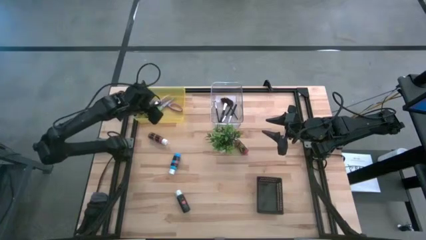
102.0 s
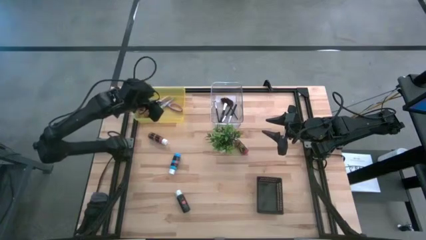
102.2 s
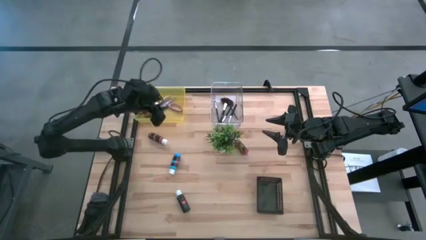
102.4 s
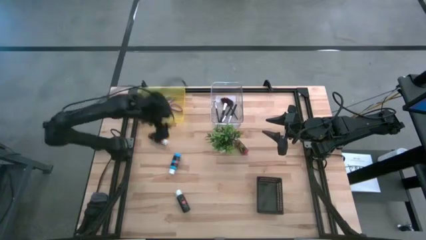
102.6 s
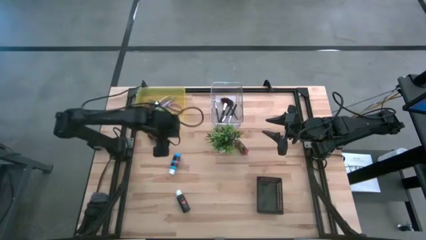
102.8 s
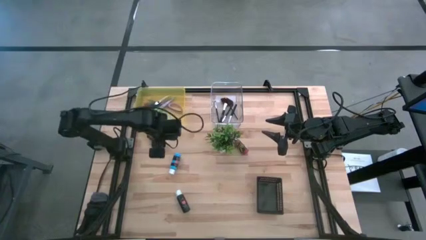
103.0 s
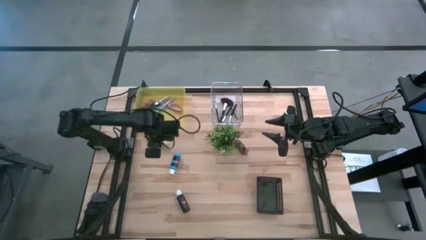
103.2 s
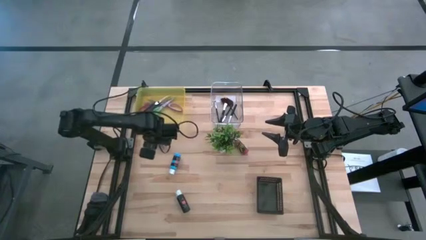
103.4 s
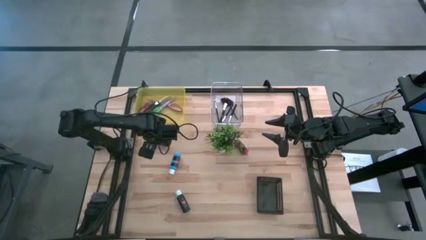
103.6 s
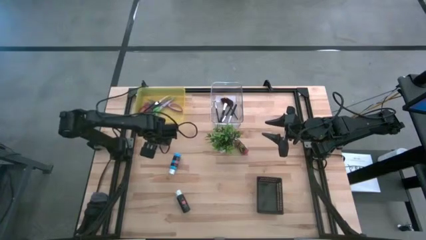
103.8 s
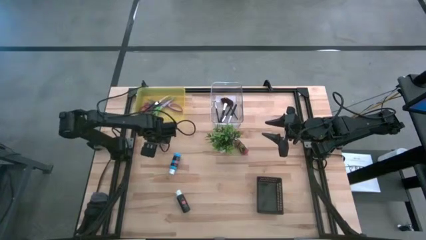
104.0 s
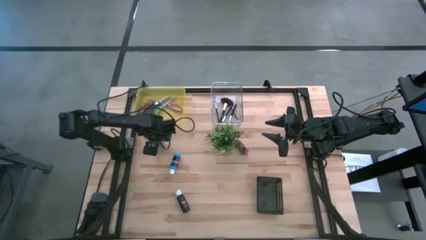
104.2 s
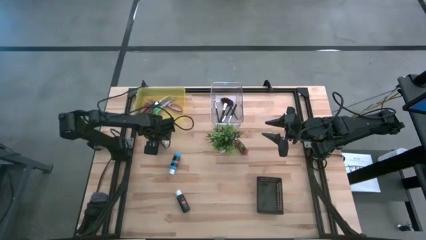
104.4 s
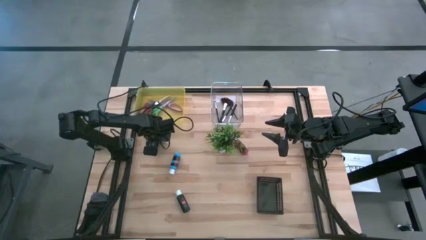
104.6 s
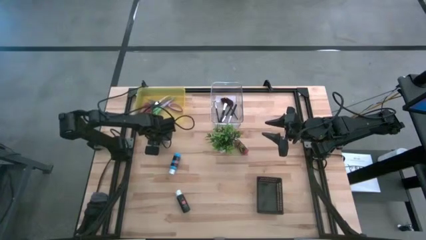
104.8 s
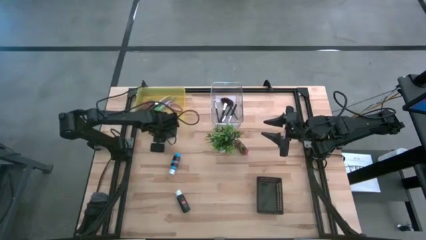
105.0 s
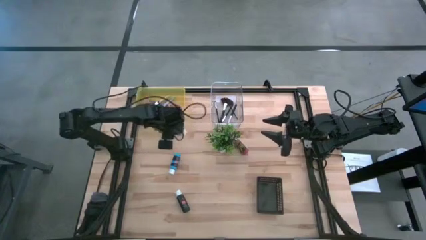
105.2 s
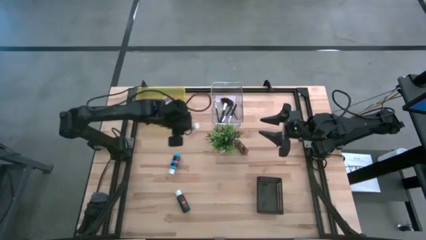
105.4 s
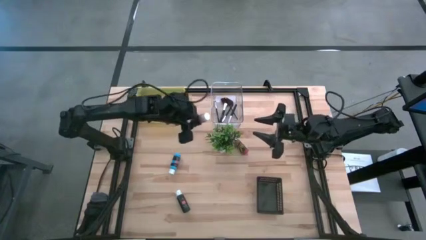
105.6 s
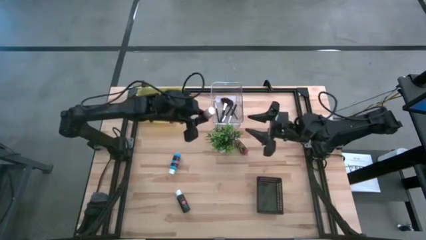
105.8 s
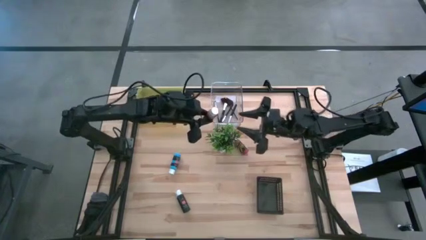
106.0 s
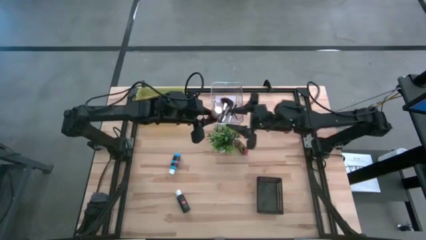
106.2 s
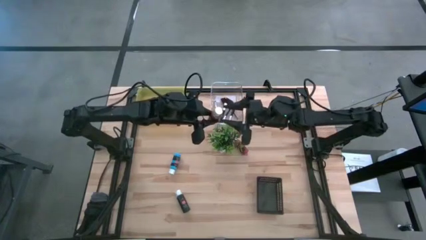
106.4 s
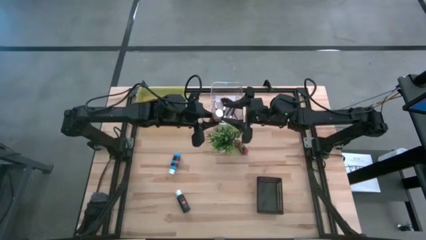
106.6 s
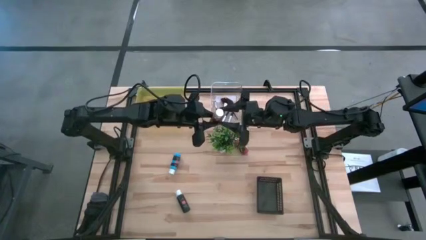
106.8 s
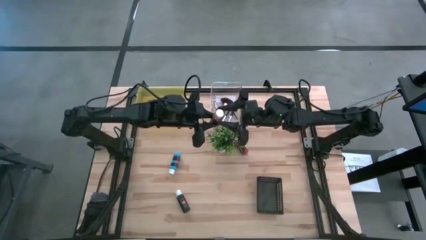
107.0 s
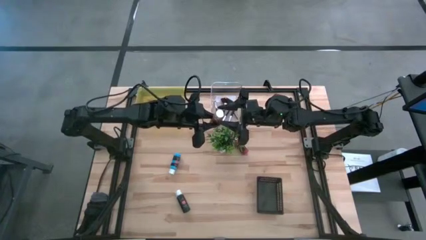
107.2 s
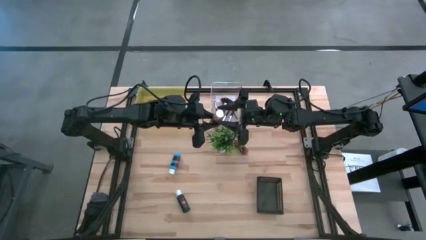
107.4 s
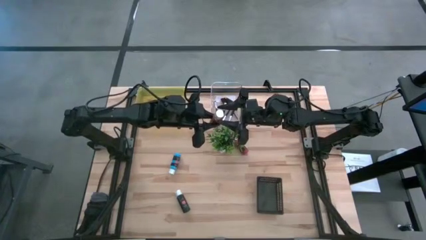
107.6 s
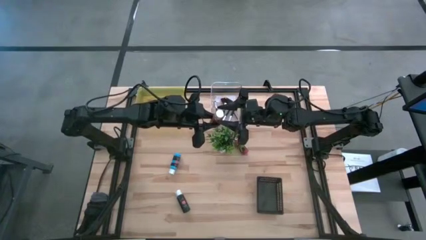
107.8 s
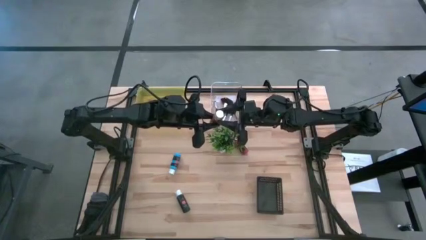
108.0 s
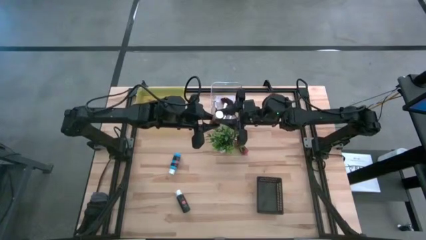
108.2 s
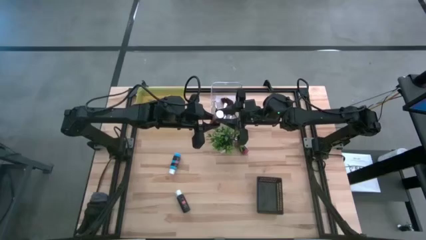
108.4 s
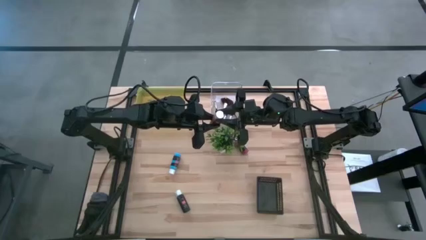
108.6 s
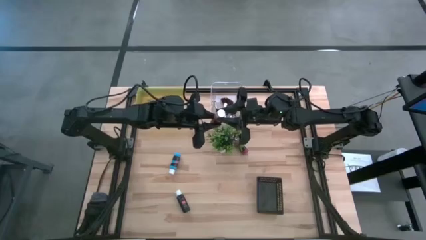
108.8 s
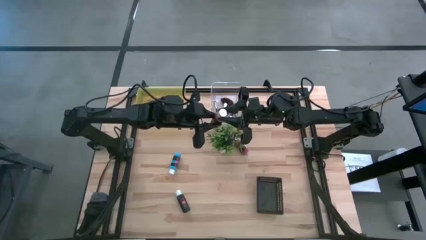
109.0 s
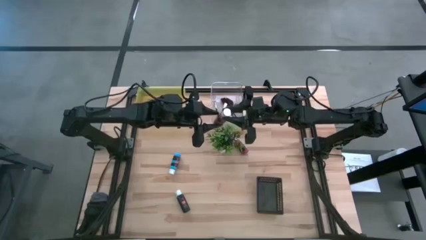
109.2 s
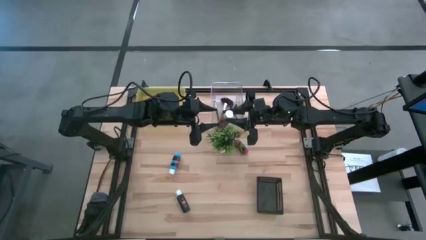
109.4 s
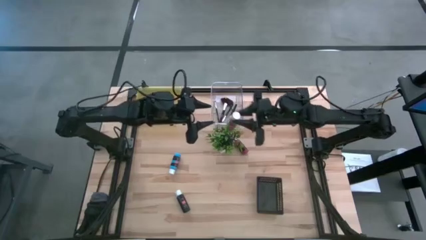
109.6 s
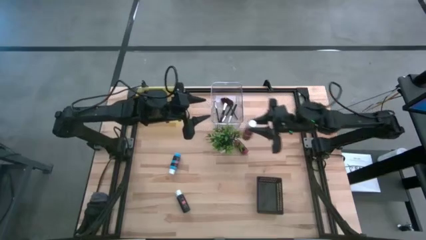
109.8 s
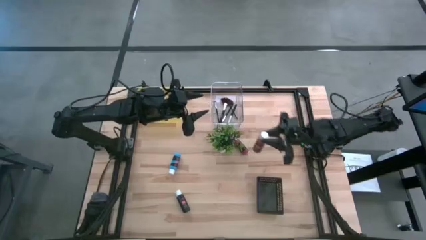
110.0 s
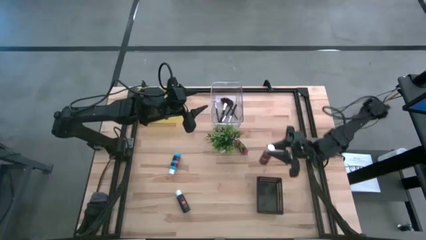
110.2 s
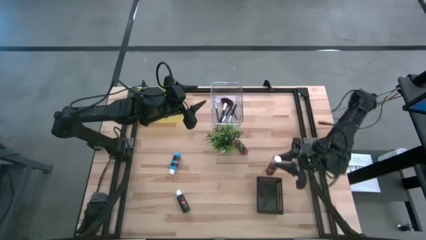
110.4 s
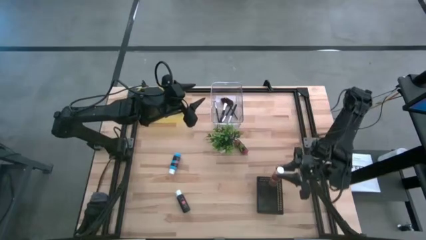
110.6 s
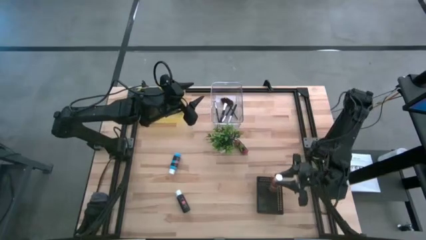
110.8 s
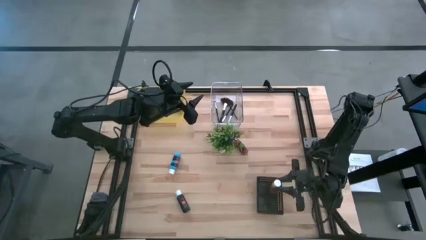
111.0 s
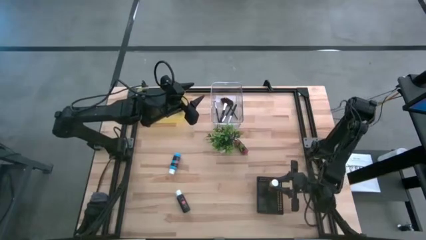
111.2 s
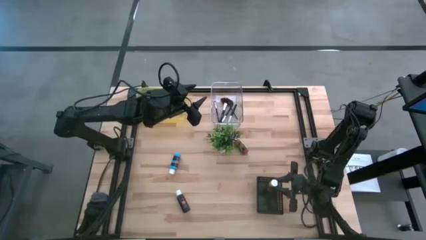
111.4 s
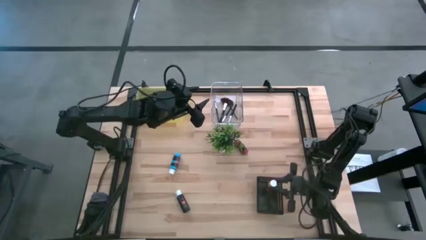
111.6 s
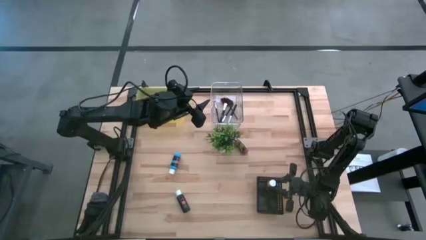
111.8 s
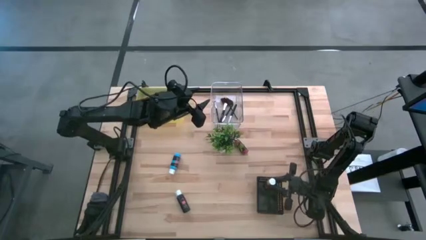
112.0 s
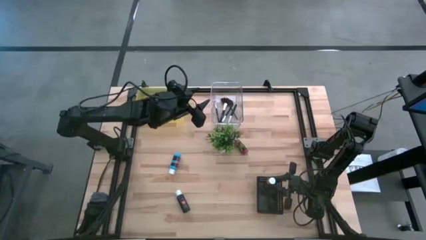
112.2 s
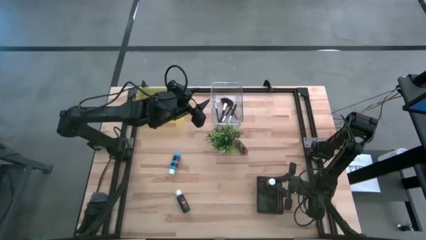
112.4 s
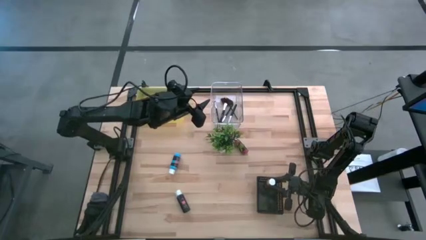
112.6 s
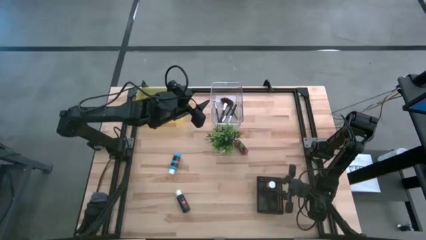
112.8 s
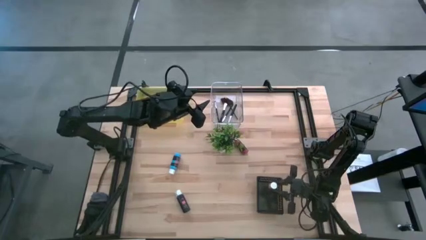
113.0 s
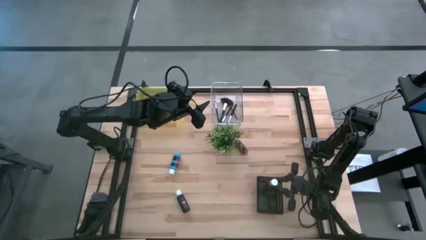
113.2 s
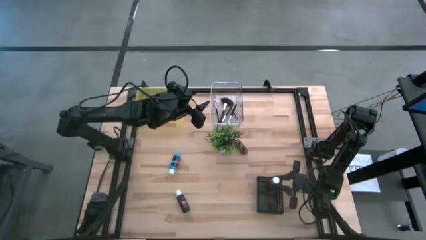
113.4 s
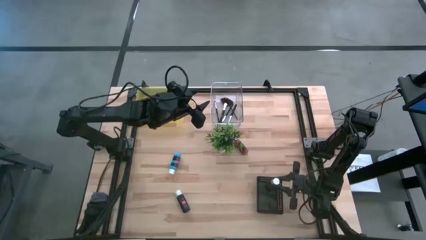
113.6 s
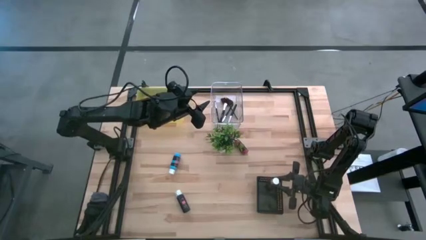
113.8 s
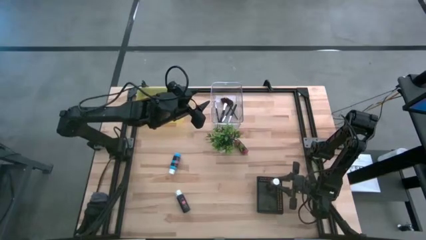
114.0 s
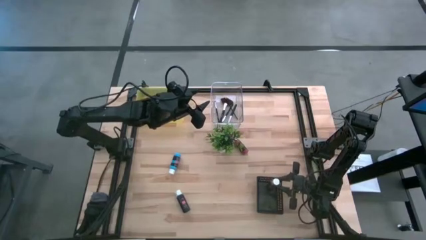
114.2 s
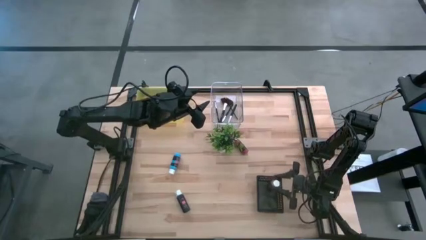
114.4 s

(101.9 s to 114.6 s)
Task: Pick & Place Paint Supplies
Put the brown paint bottle into the black bin
